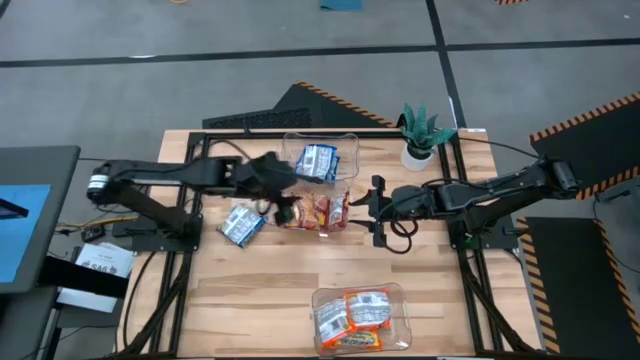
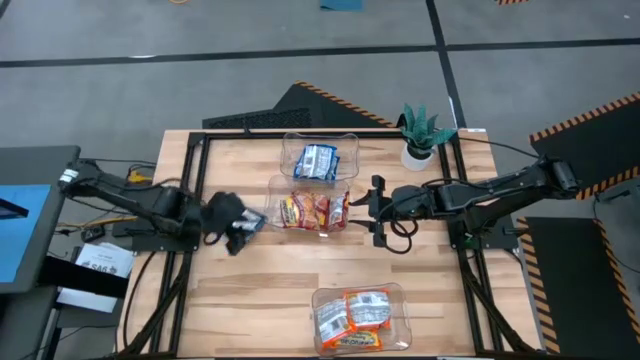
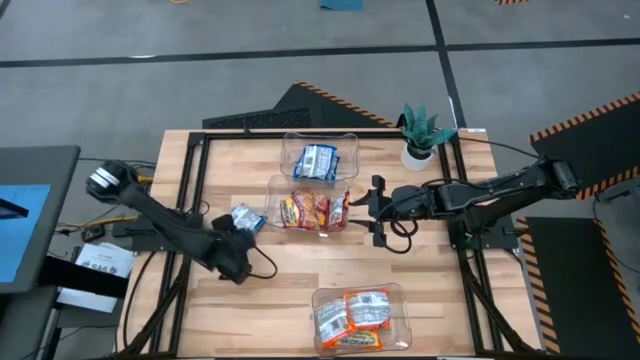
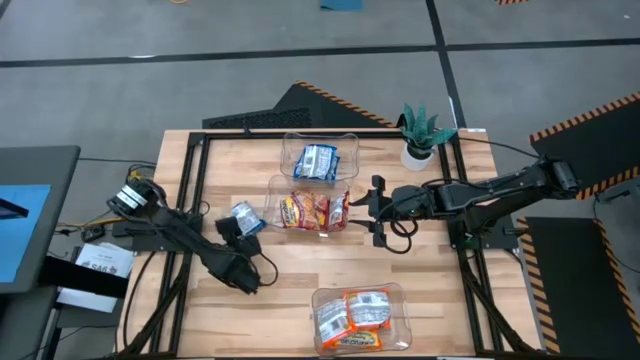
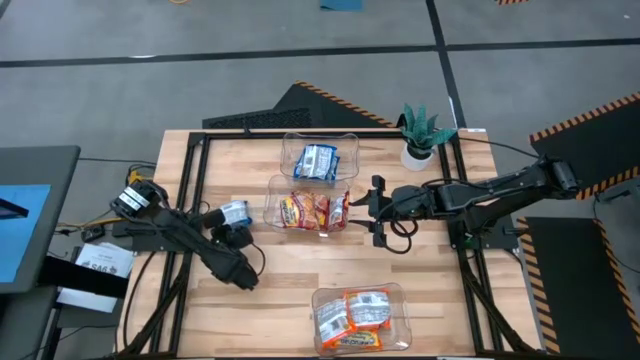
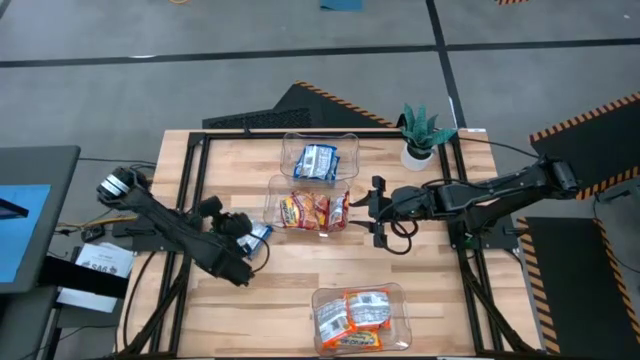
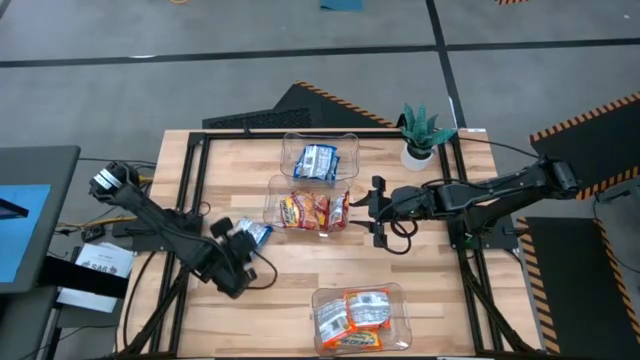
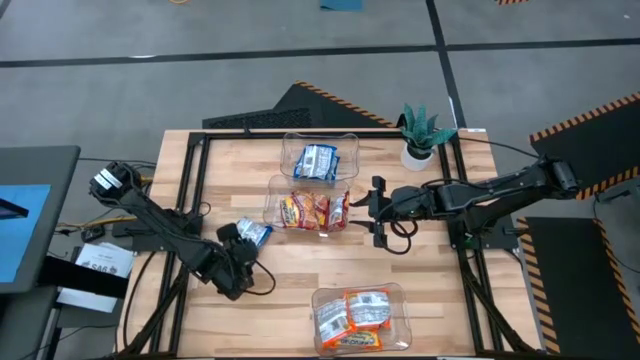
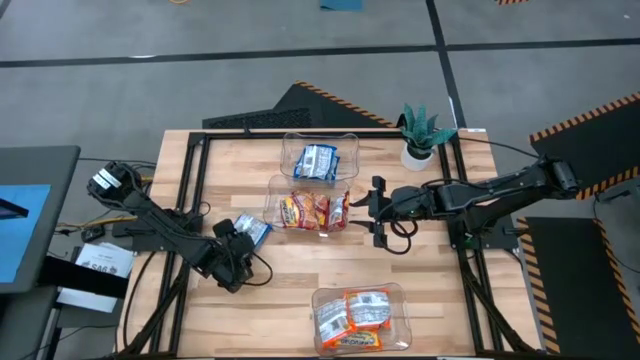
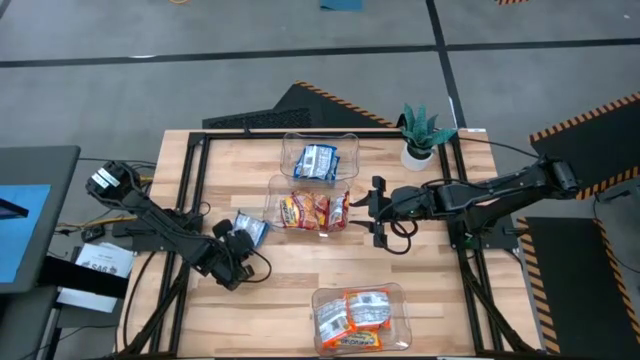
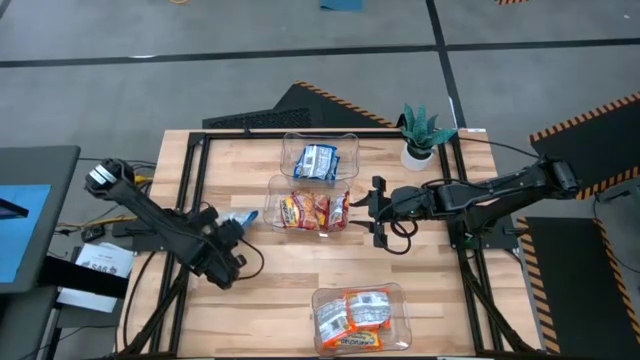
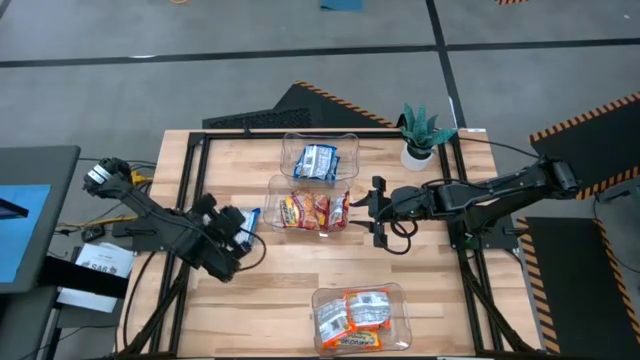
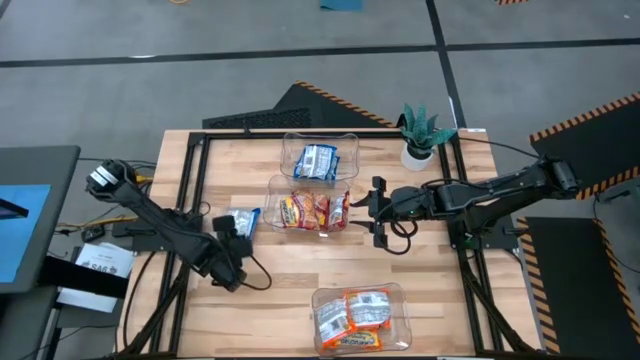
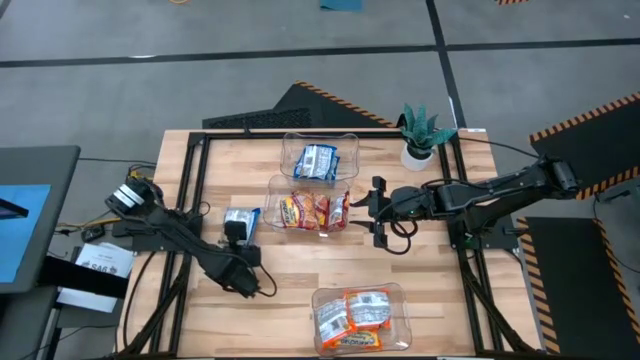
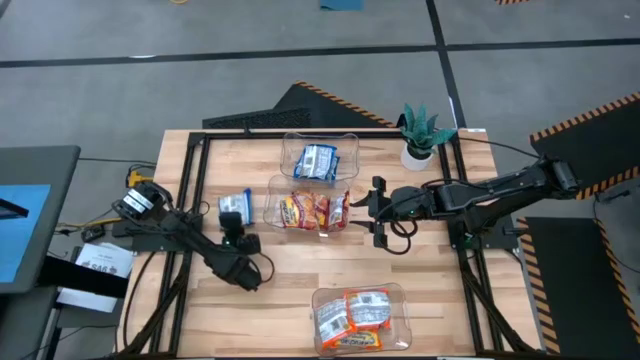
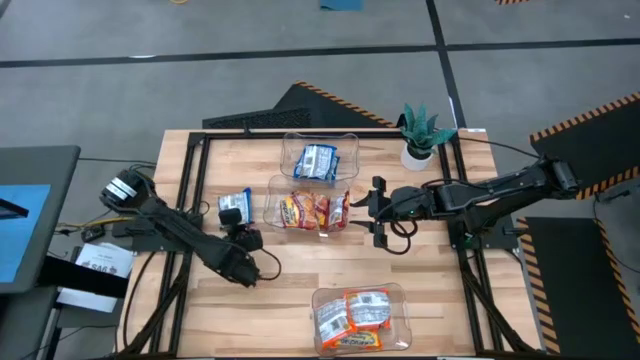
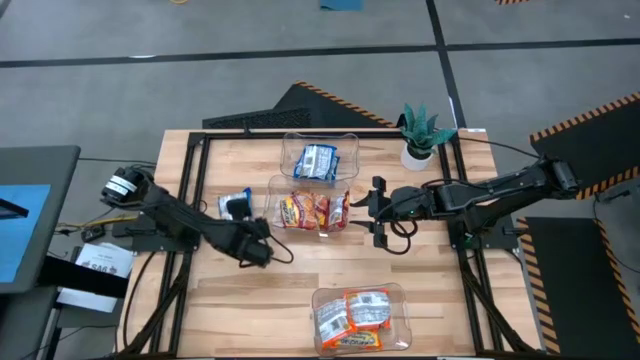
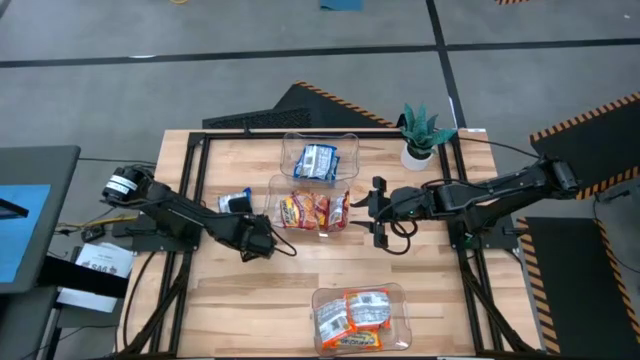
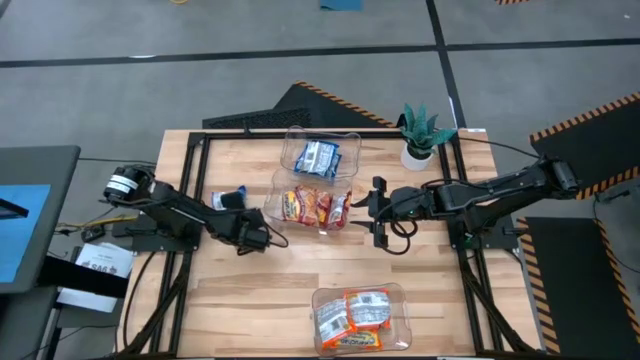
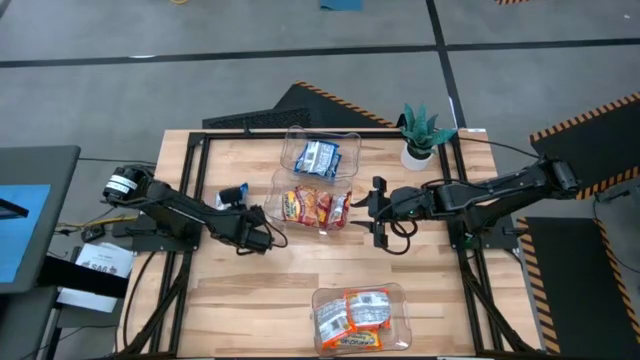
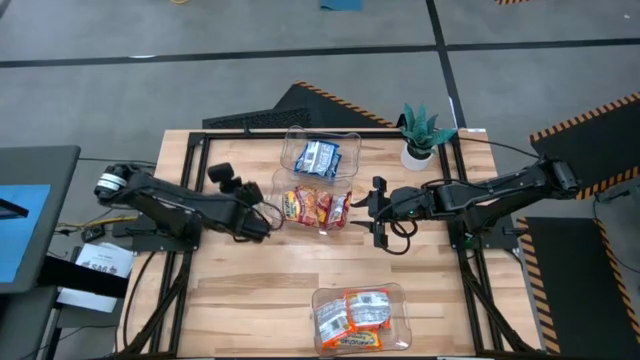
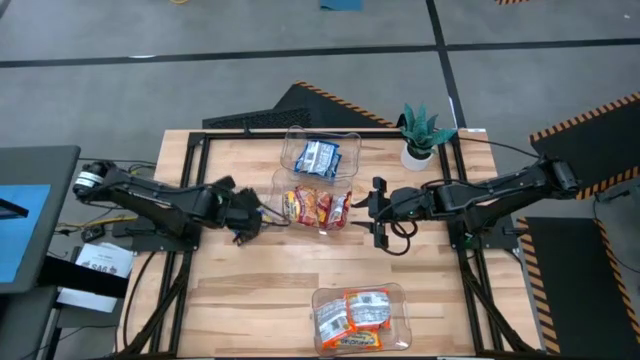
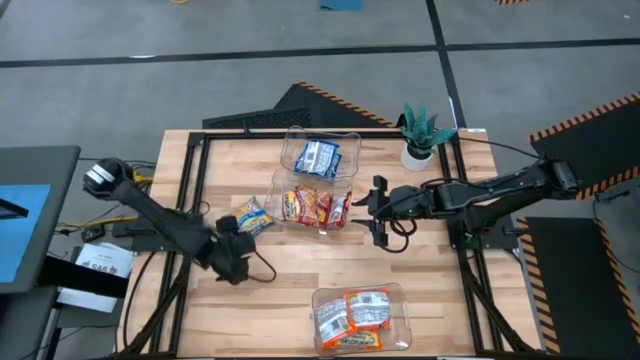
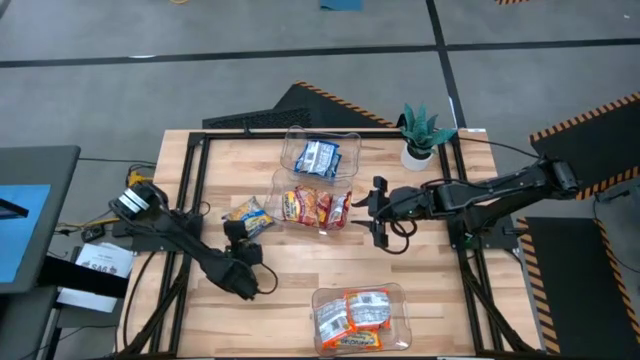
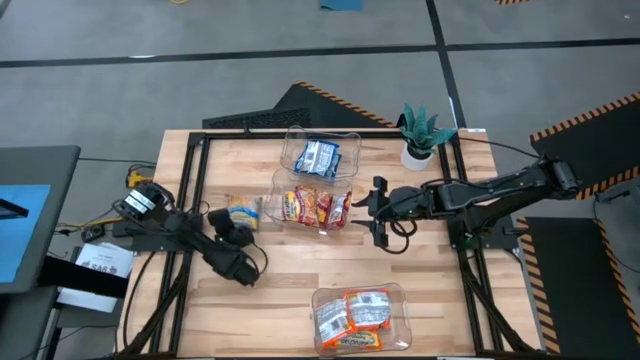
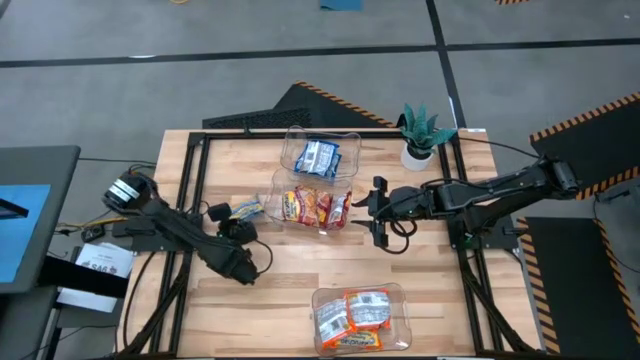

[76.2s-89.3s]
Task: Sort Maruchan noodles
Put the blue noodle pack into the top transparent bin

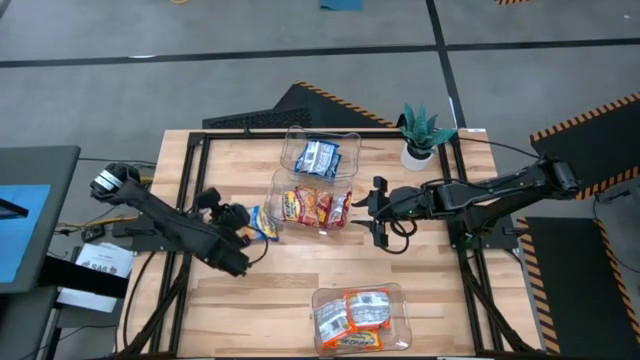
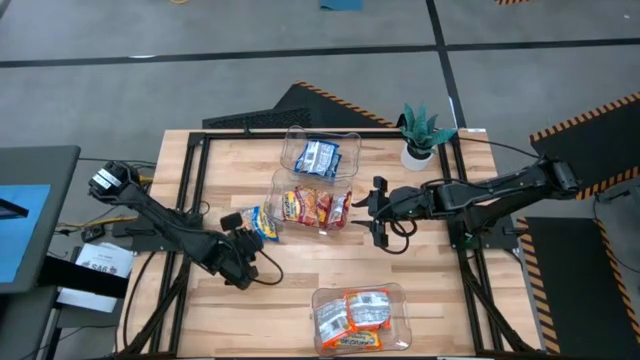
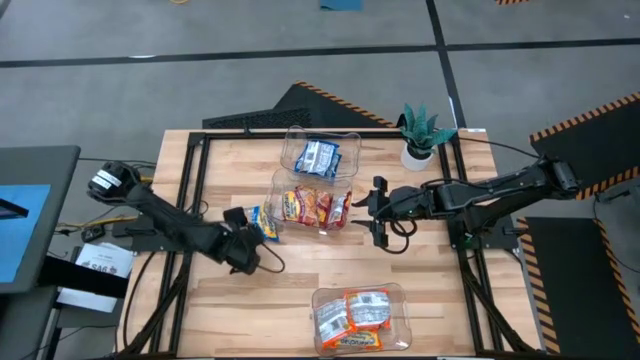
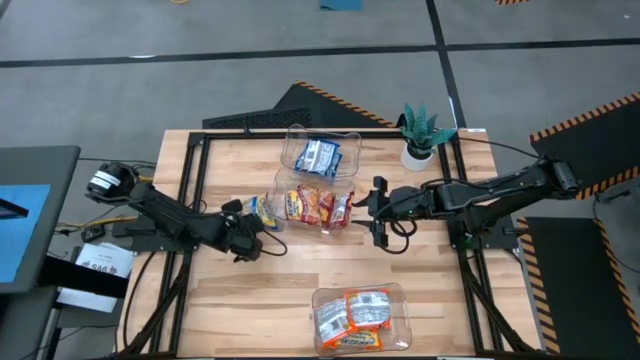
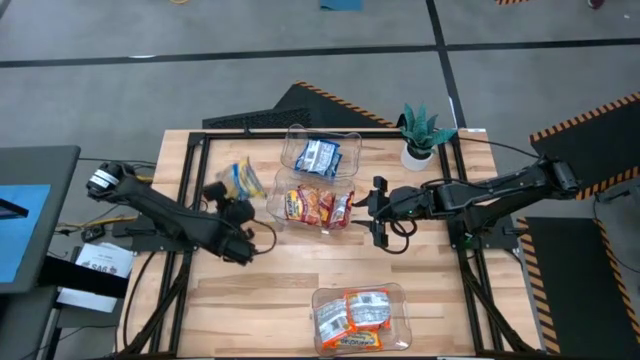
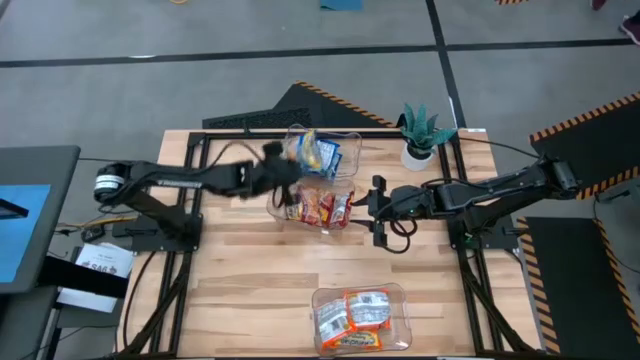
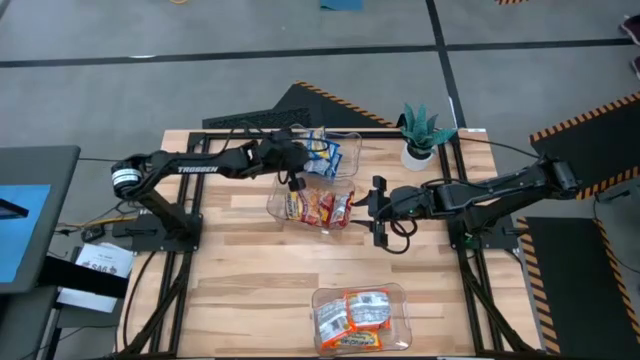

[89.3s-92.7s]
Put the blue noodle pack into the top transparent bin

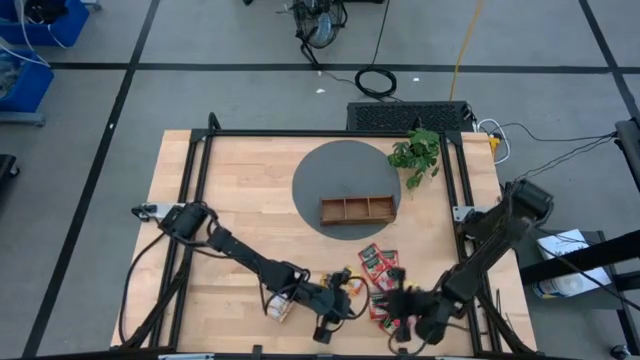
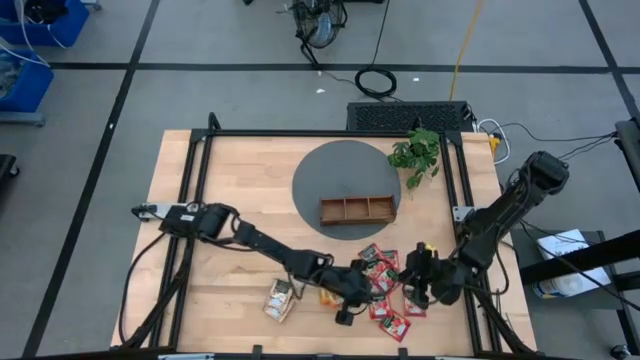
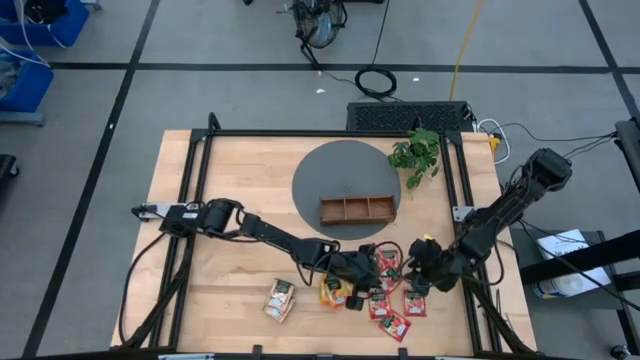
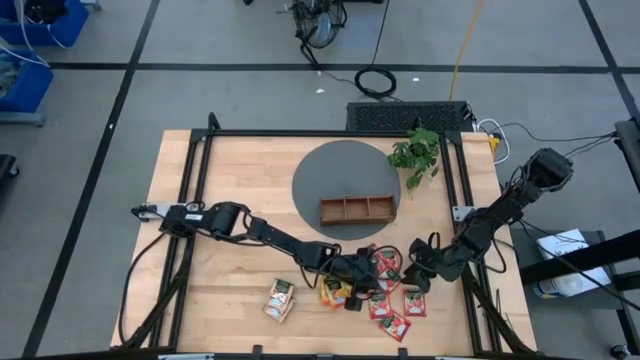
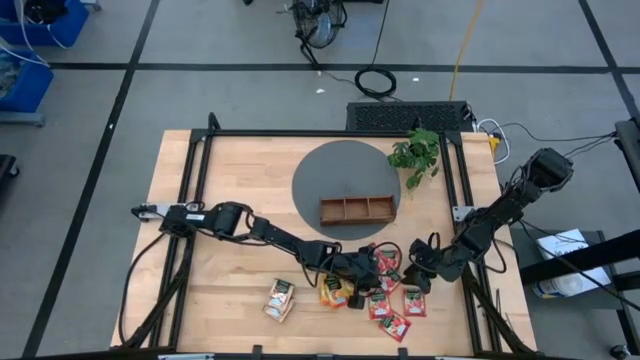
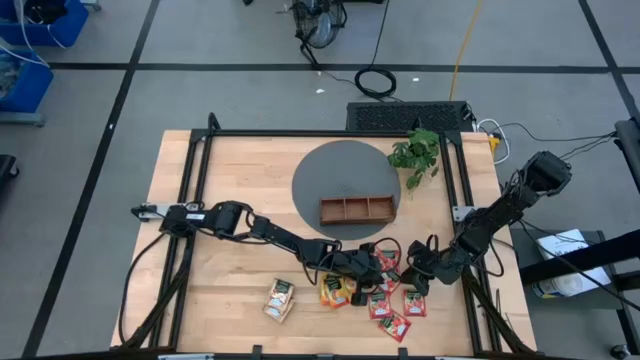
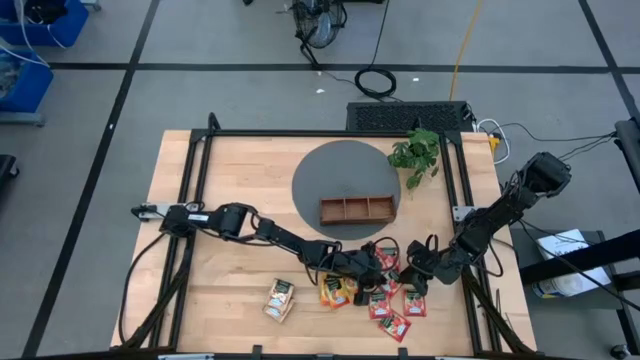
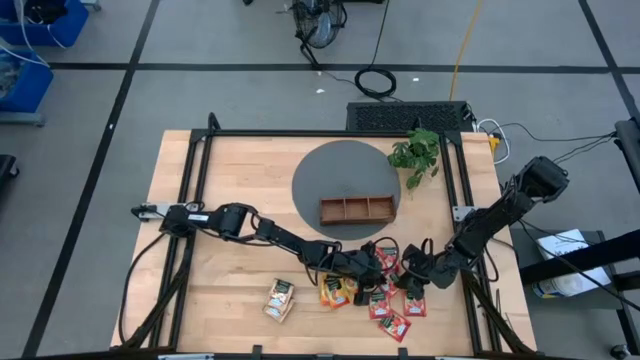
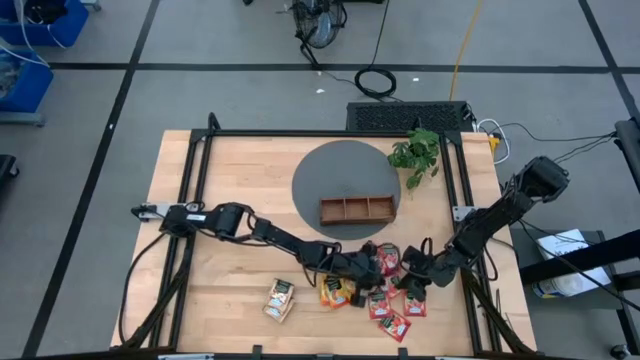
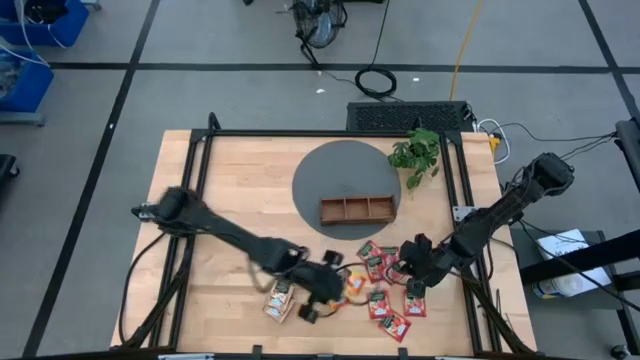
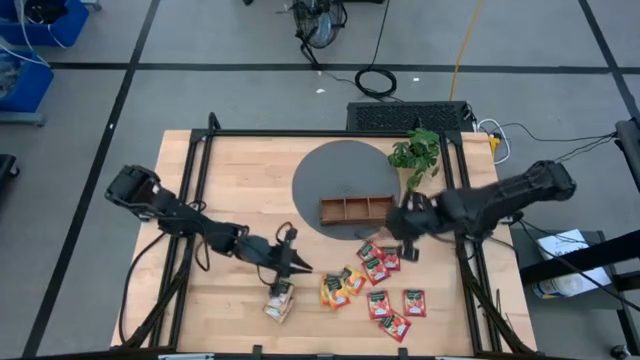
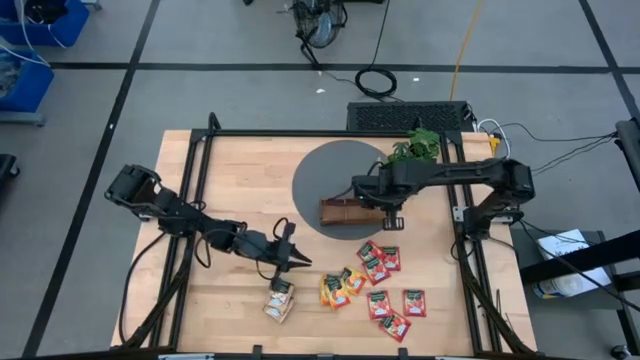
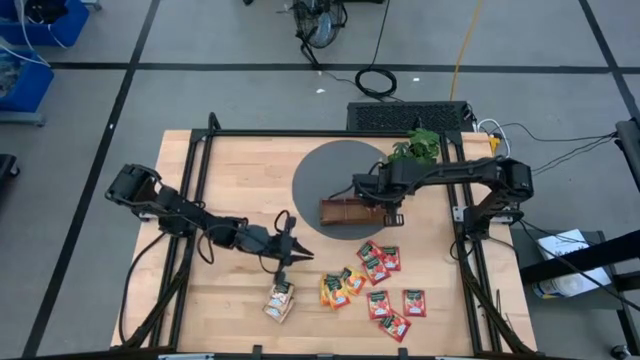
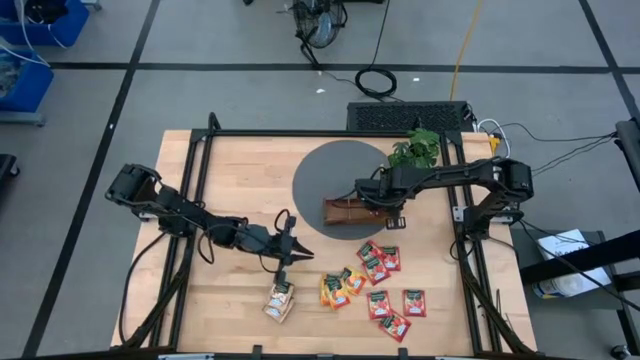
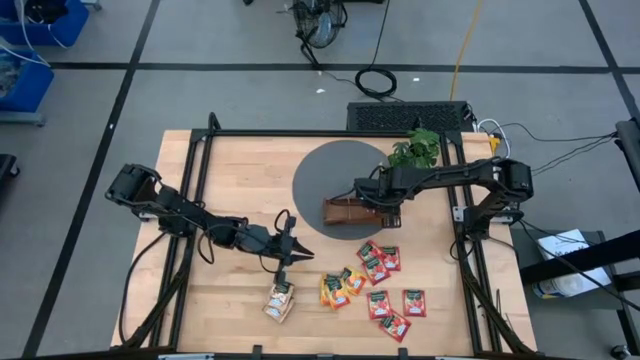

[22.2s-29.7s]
Task: Pick & Place Tea
Put the red tea bag into the right section of the wooden organizer
